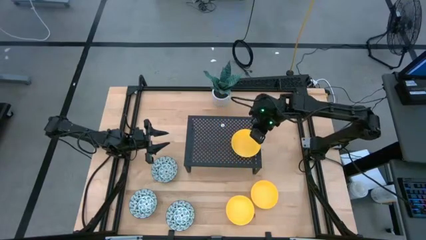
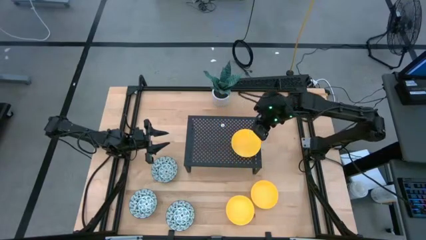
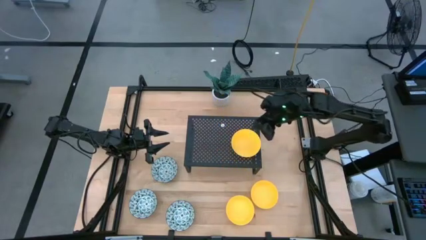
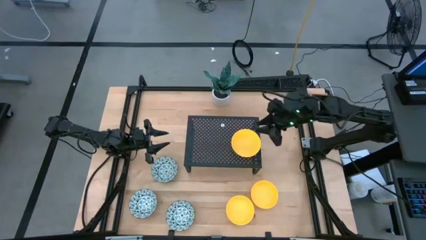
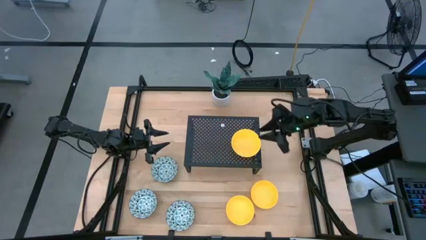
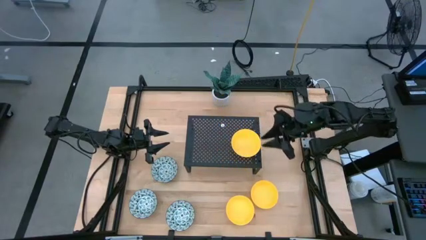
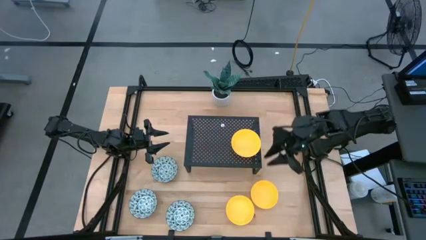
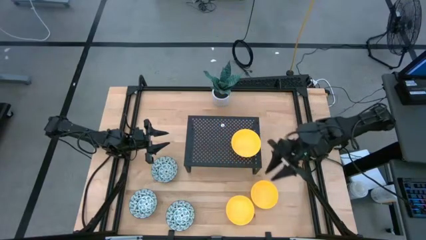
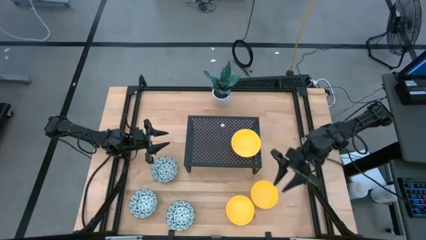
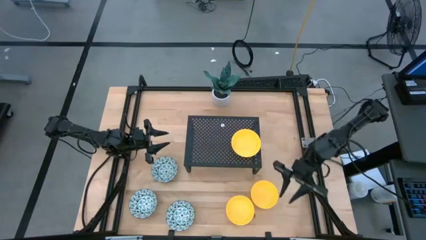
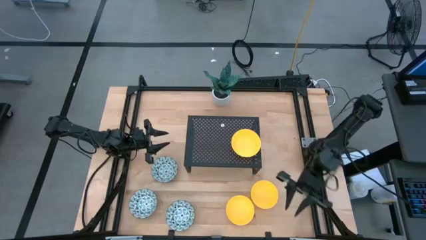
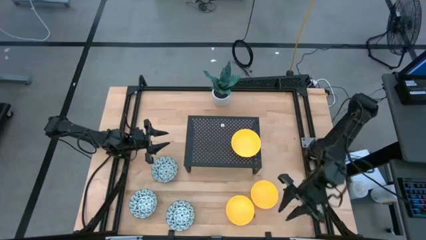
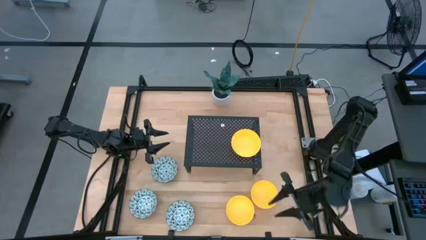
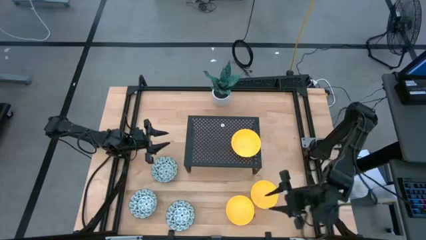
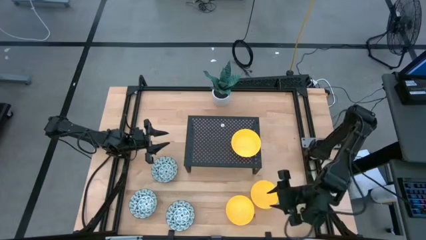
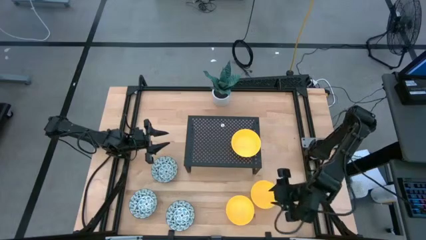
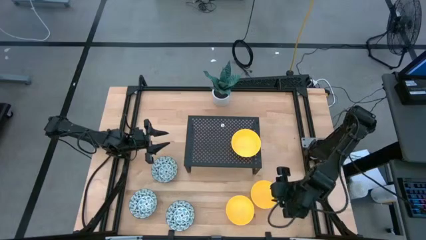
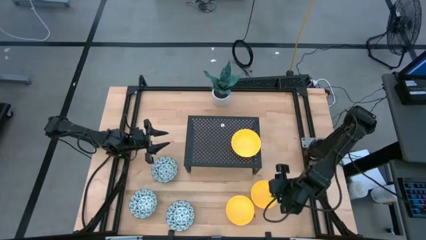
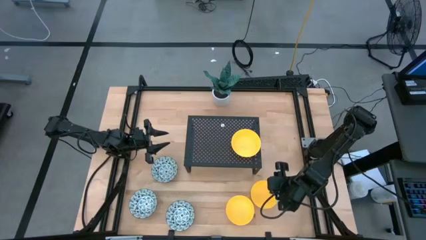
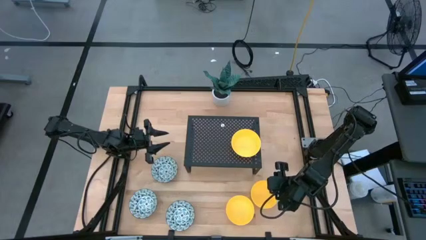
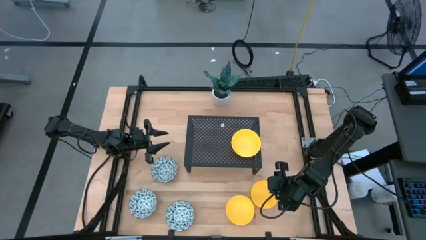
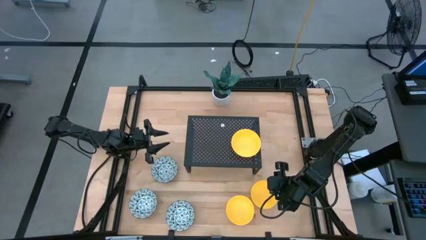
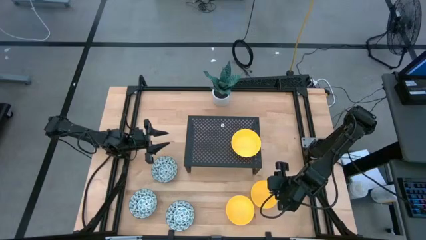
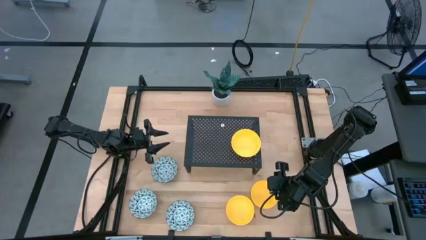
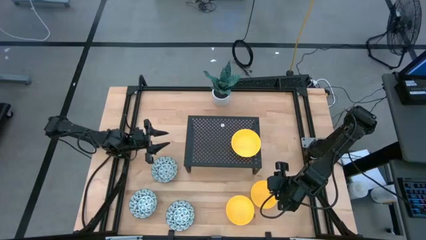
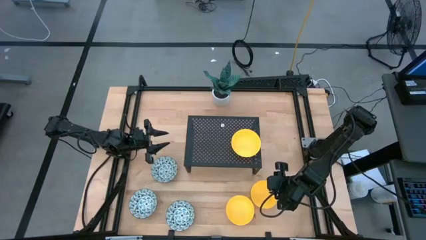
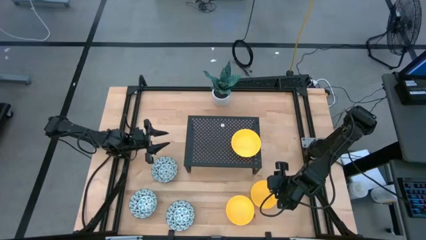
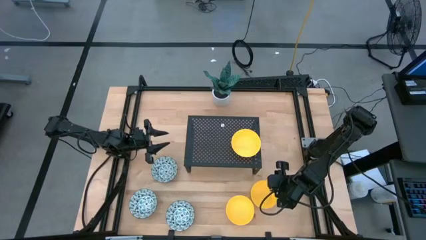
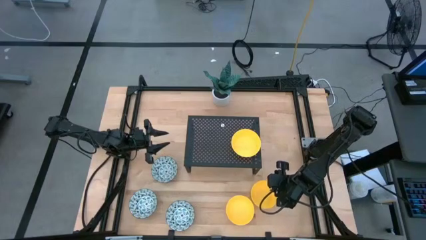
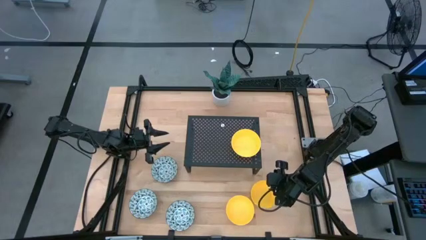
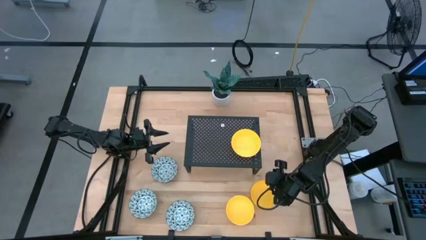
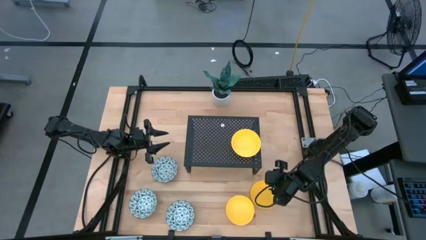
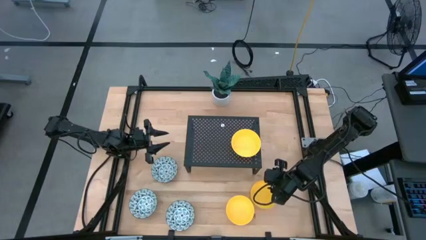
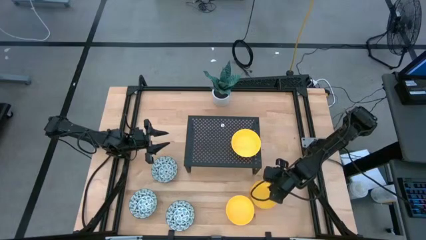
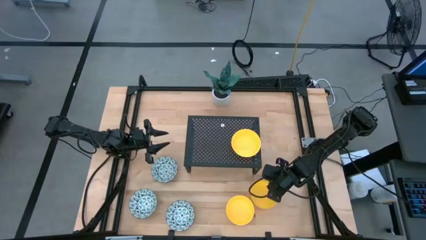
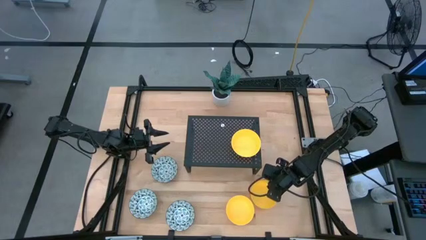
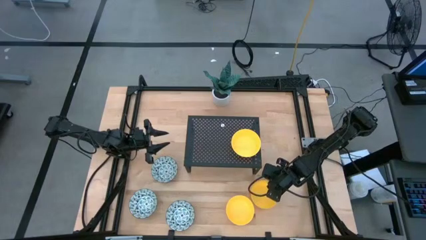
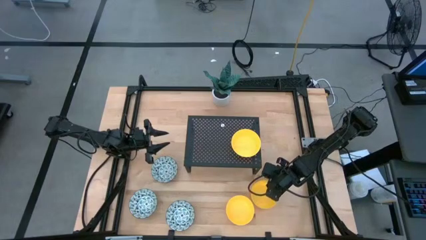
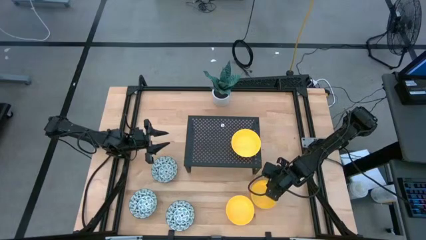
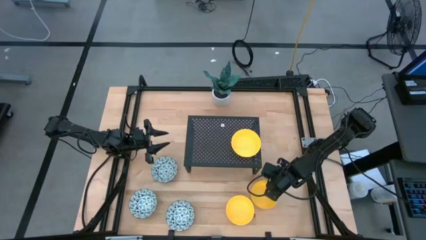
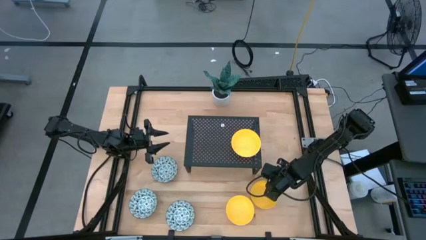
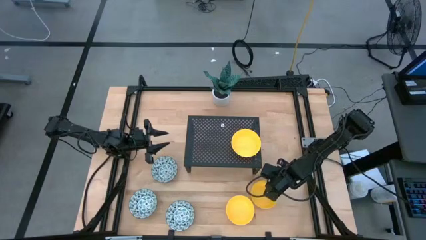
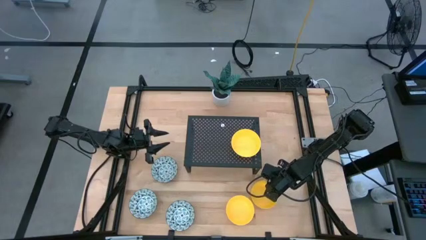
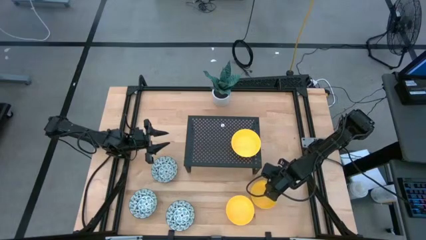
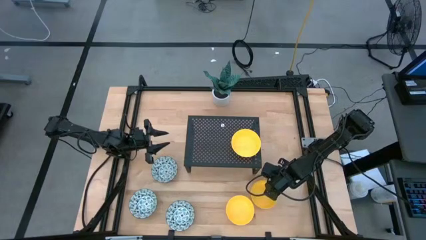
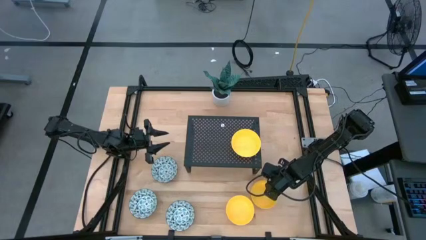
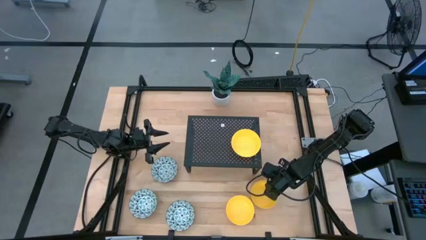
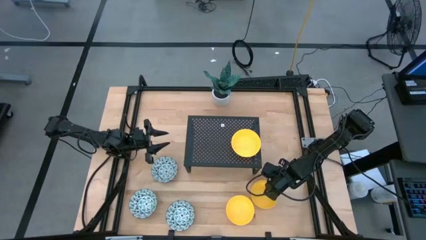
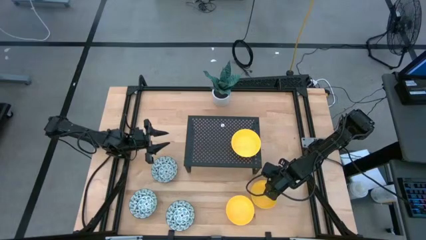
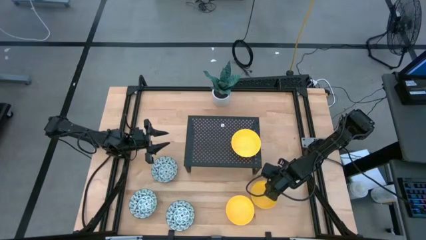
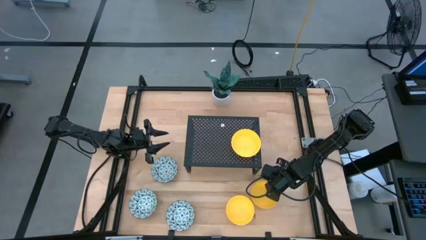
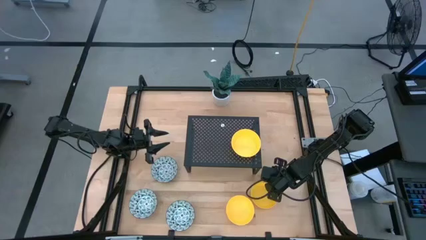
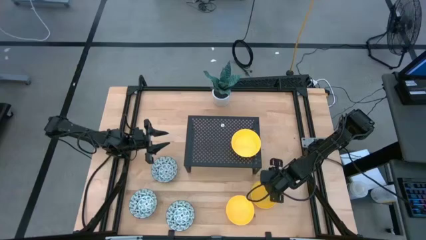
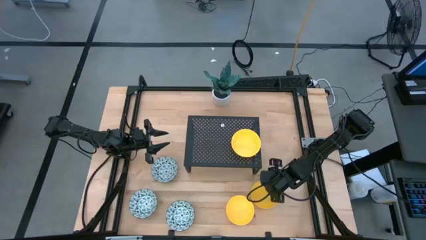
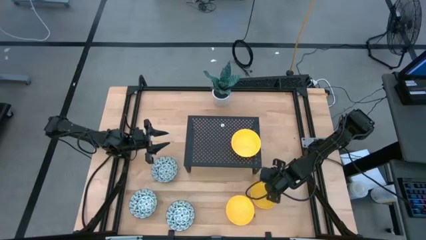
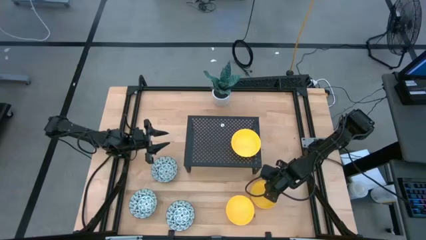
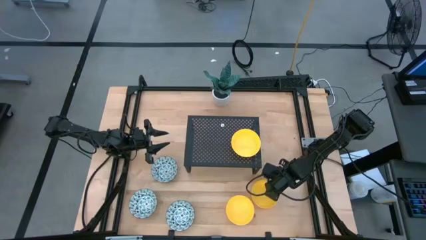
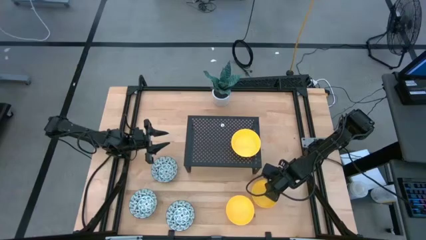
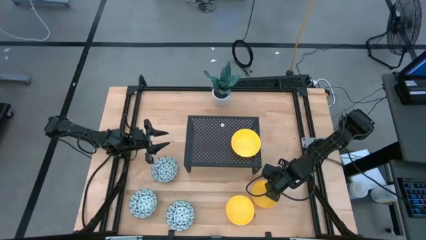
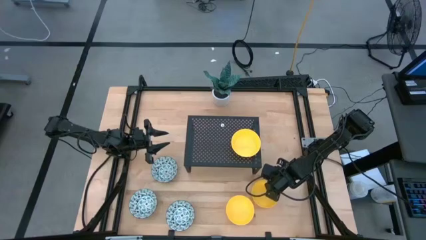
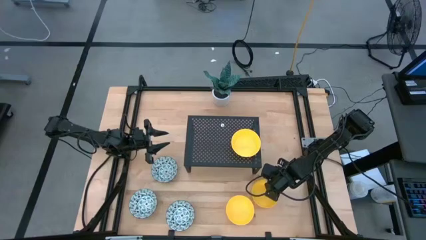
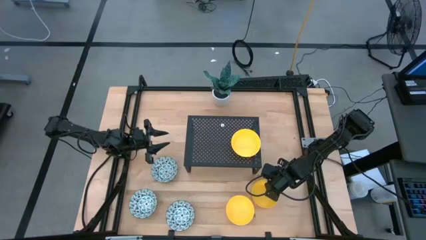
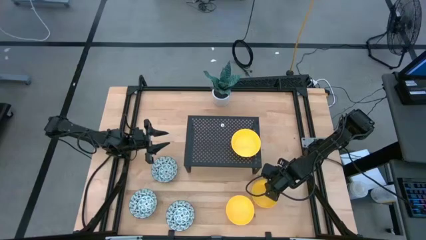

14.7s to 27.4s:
Task: Pick & Place Mini bowls
Stack the right yellow bowl on the yellow bowl on the shelf

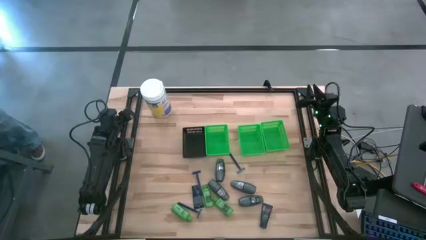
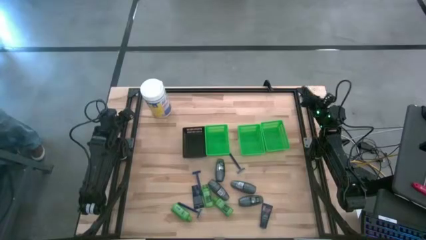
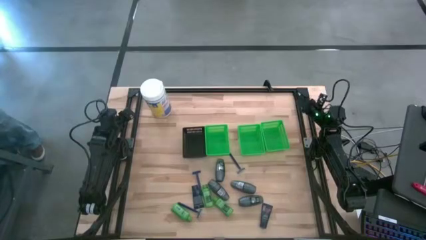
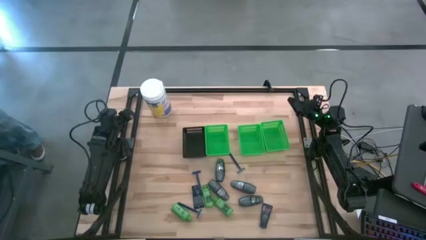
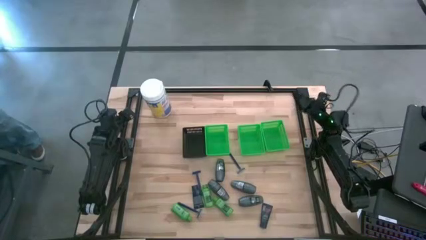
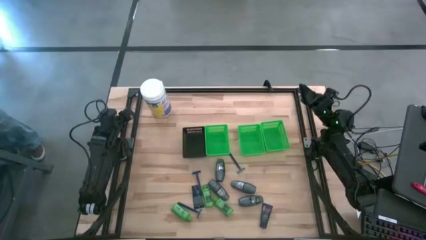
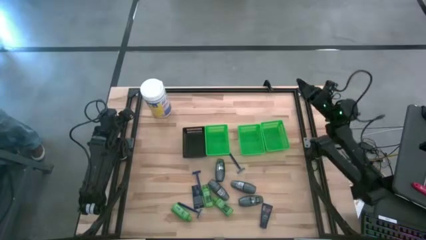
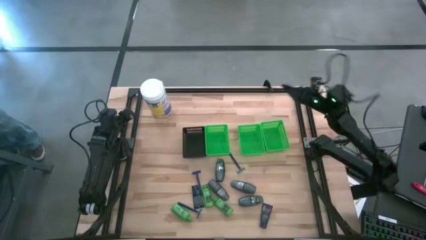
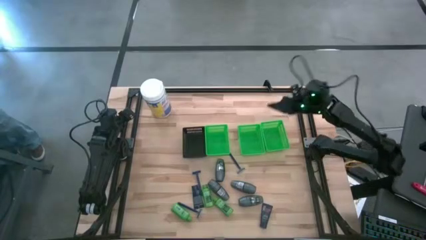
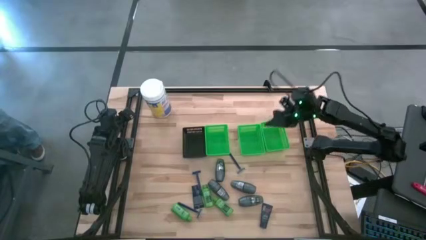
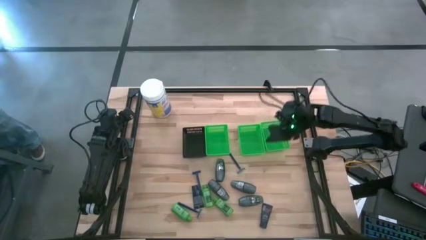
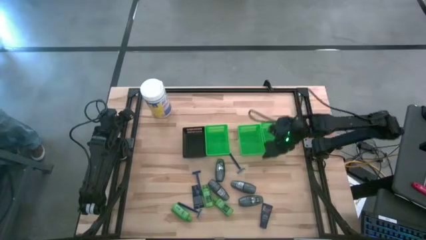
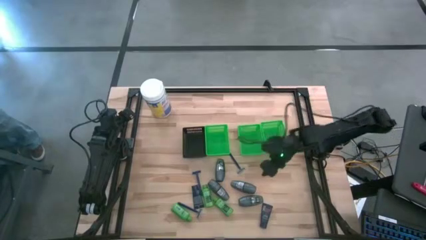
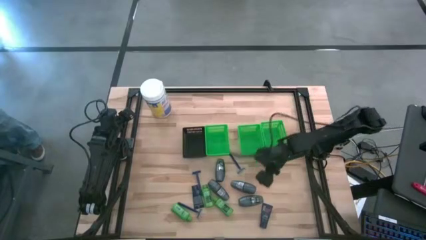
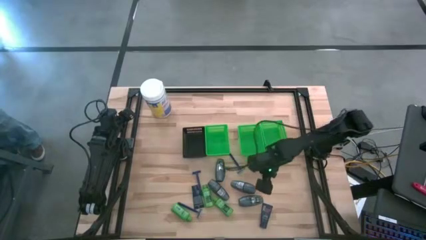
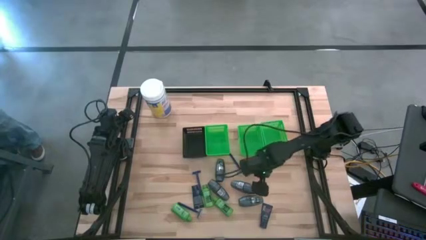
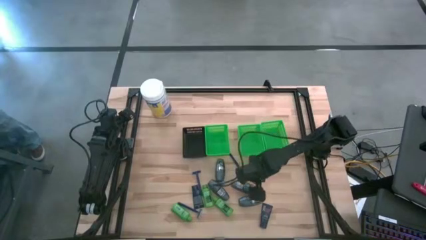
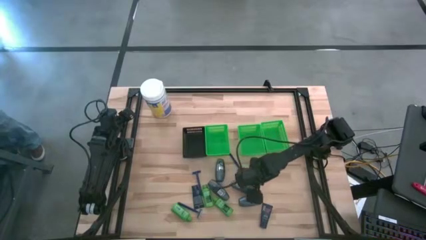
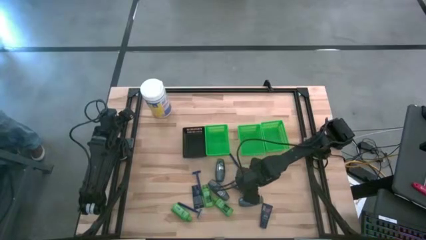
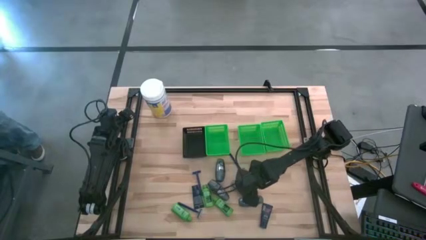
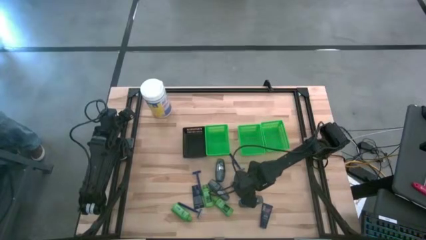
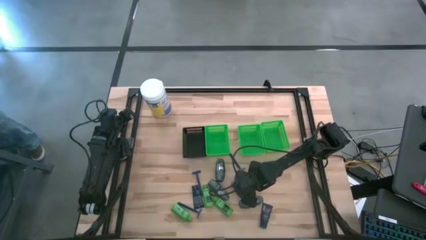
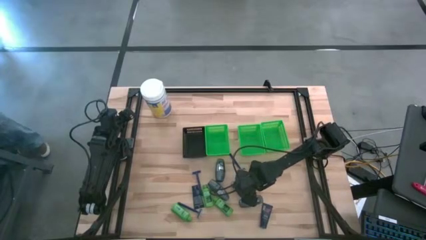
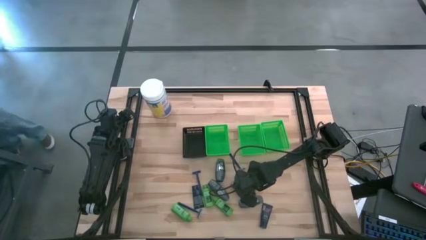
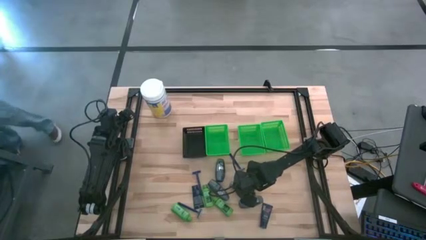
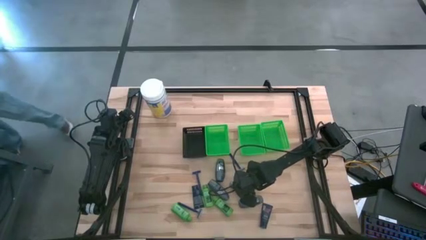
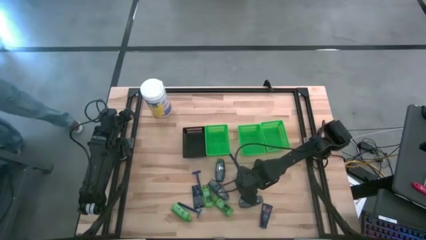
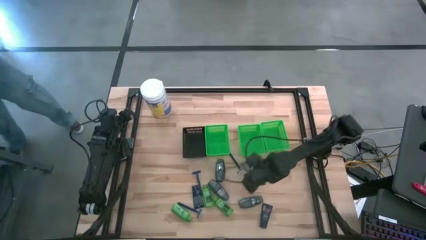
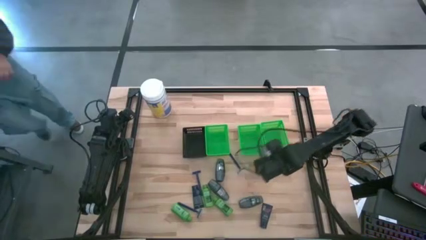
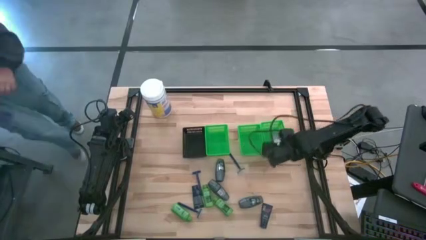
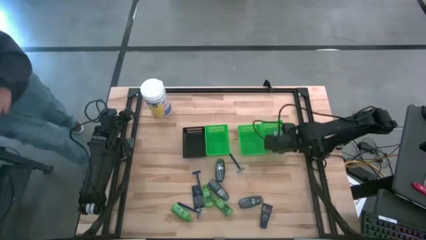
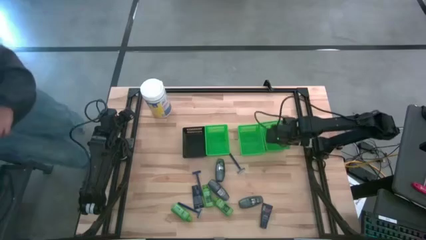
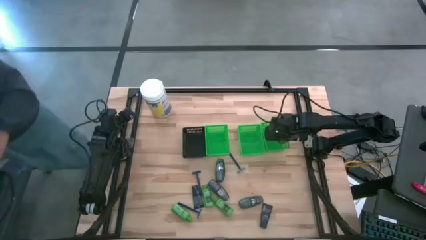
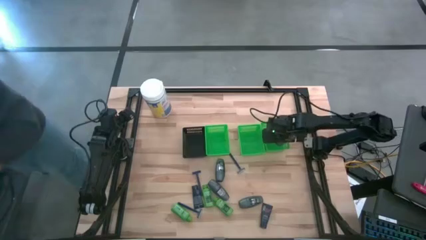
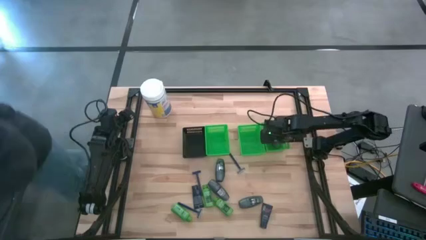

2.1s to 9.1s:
Task: Pick & Place Travel size toiletries
Put the black deodorant into the right green bin
